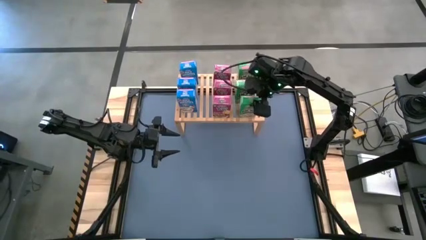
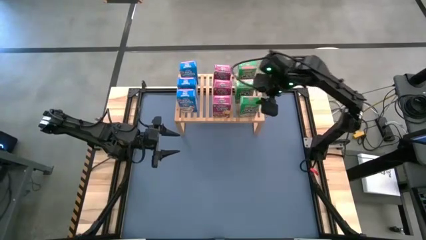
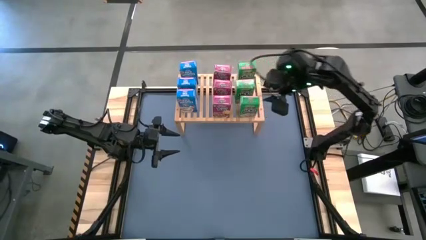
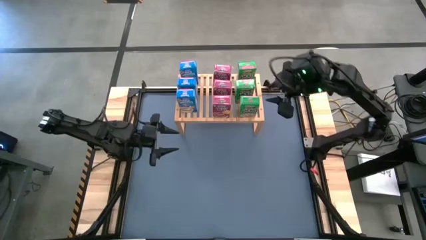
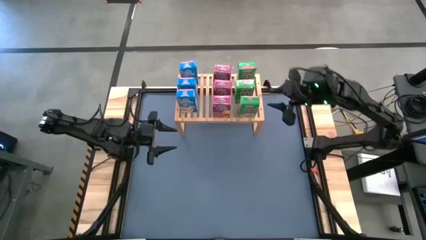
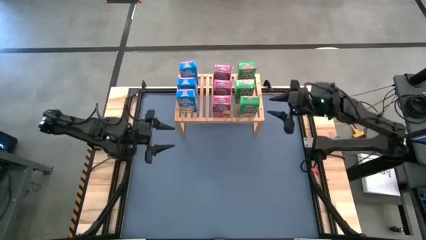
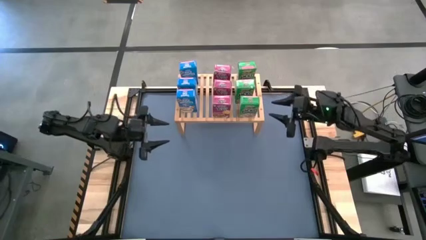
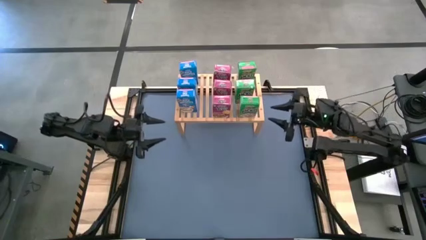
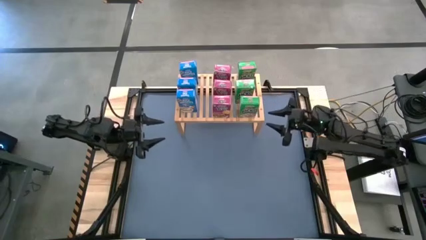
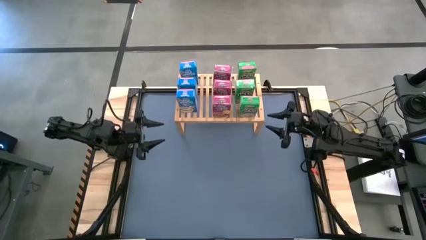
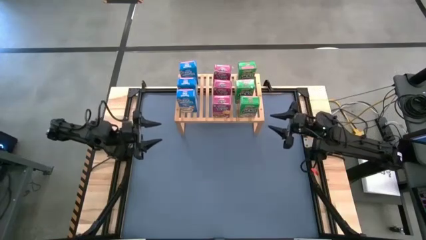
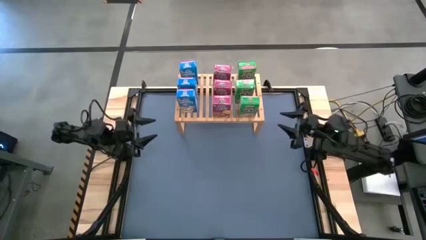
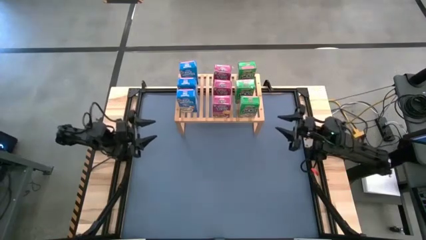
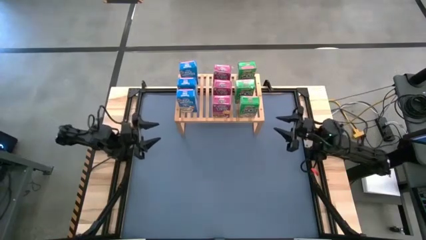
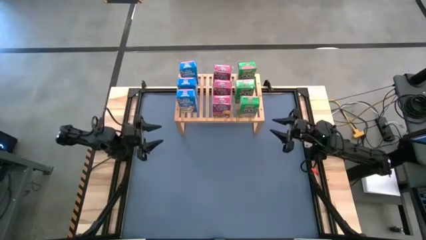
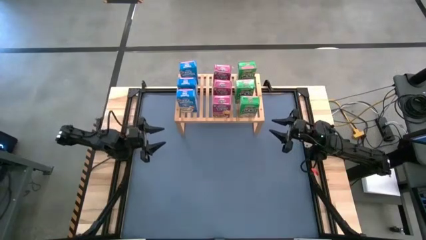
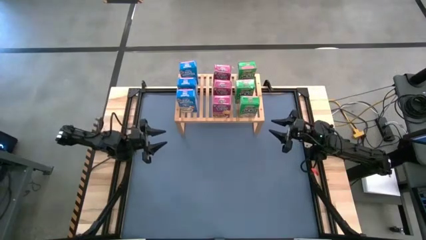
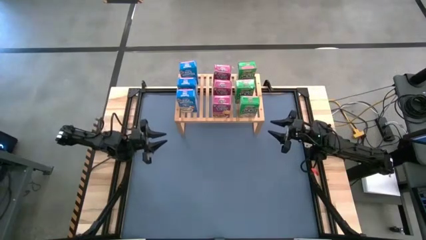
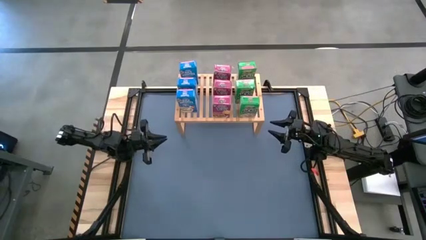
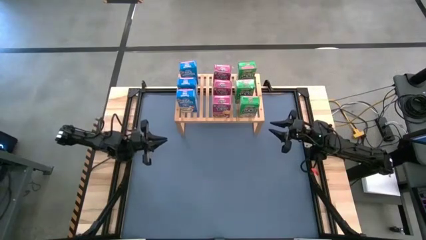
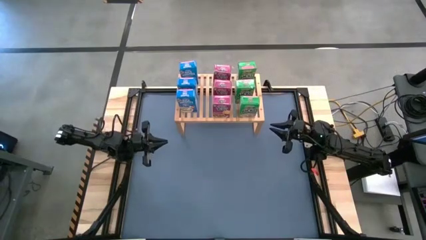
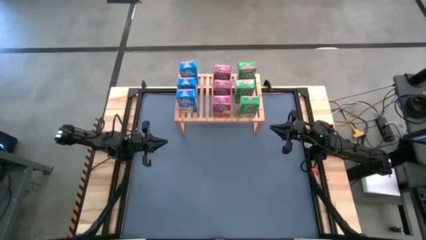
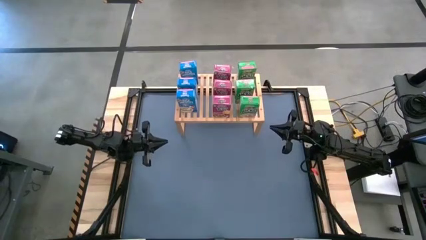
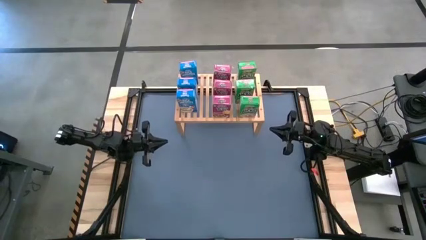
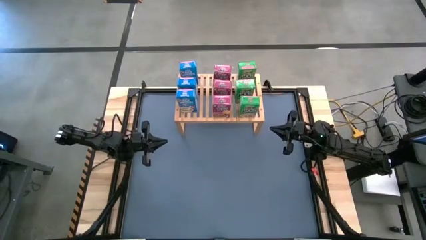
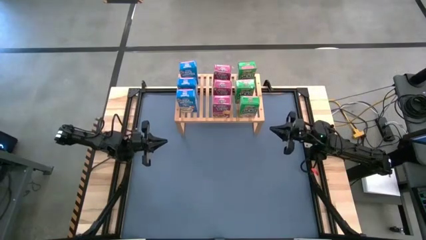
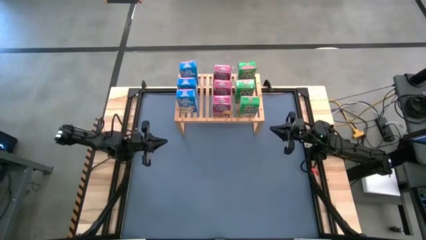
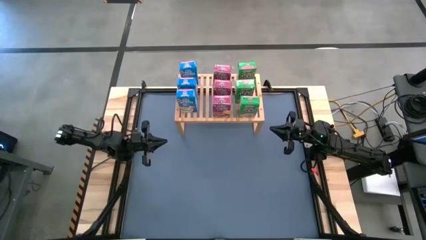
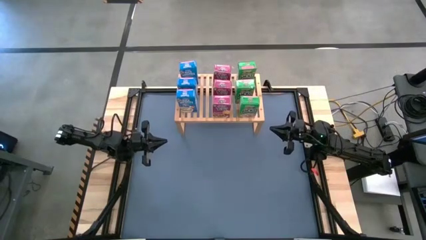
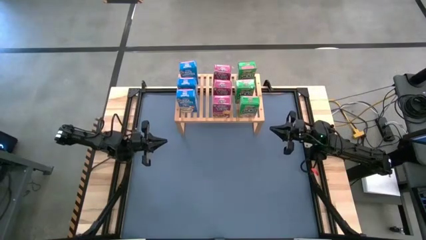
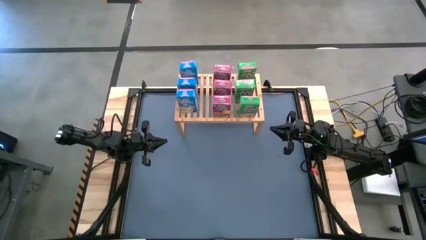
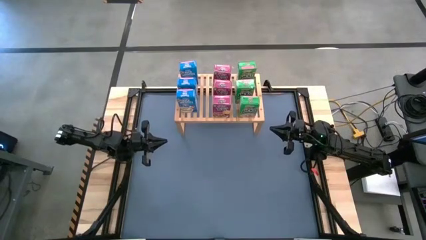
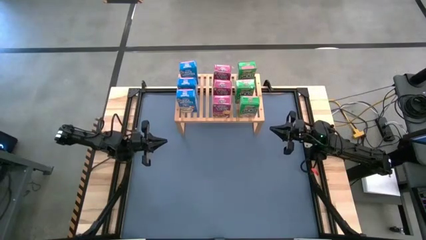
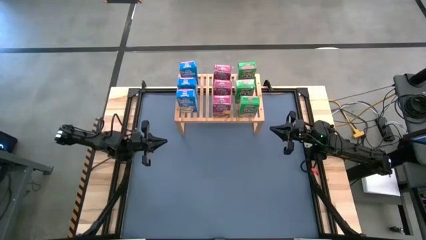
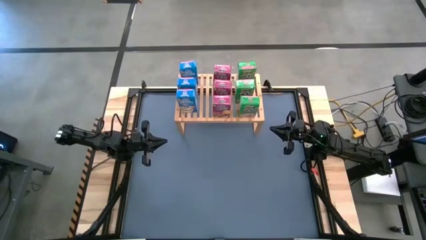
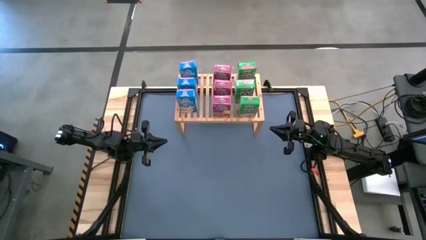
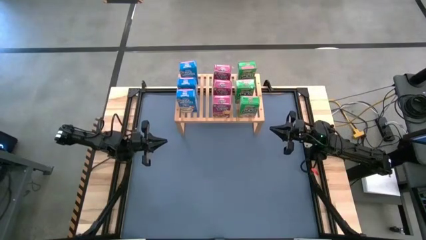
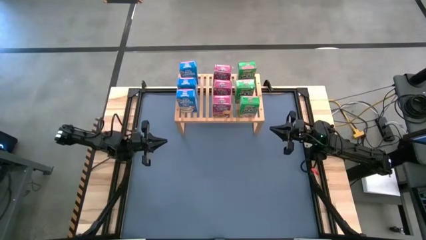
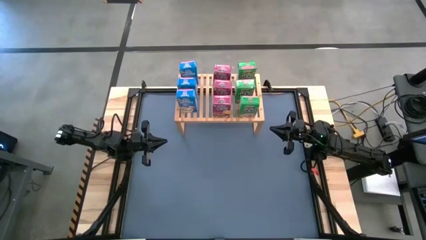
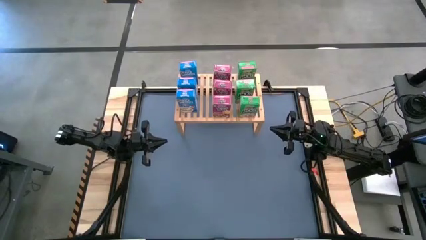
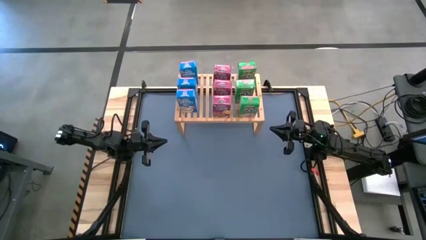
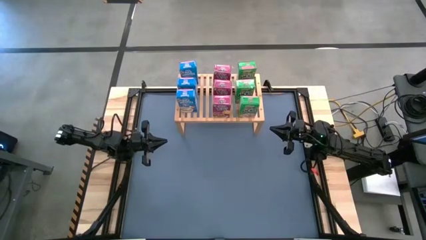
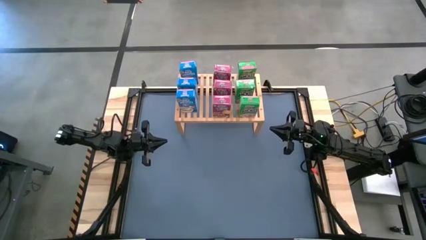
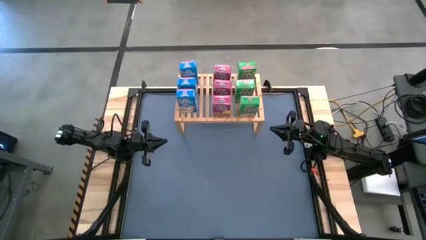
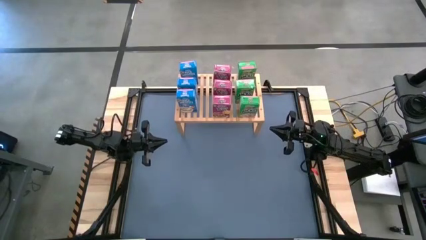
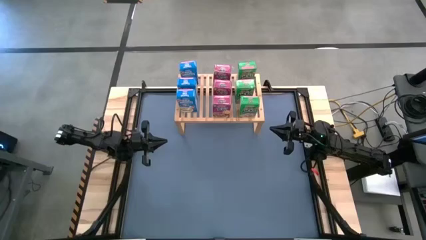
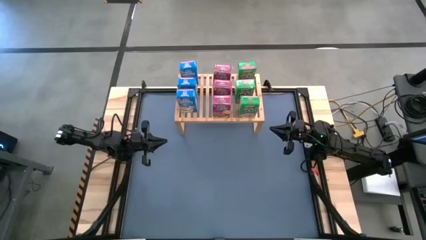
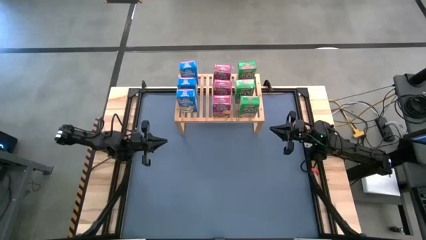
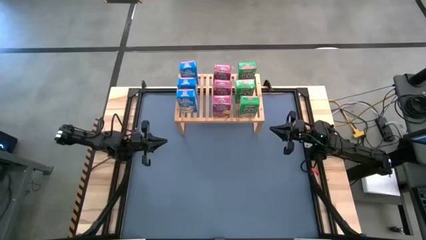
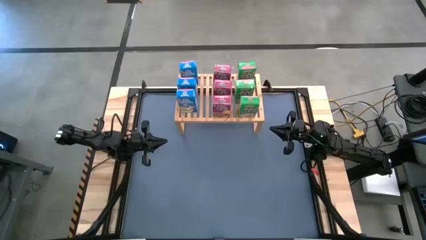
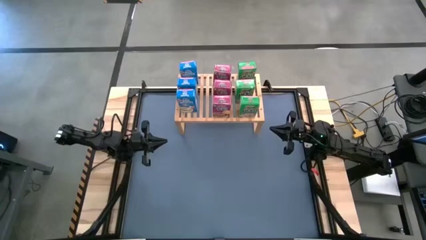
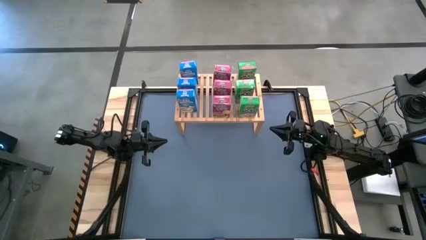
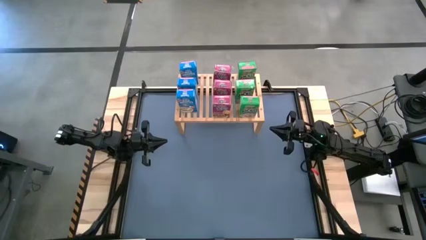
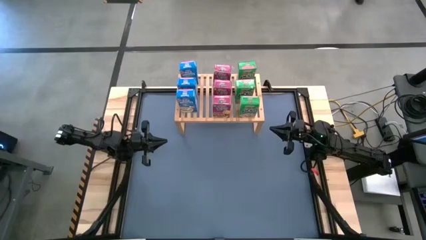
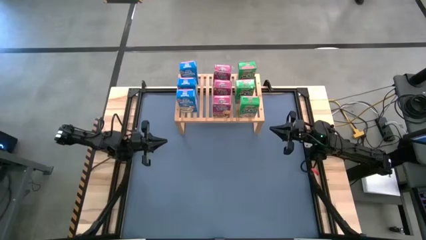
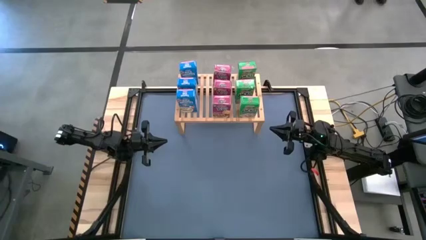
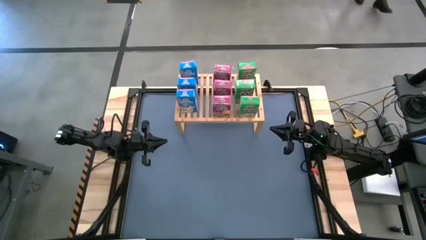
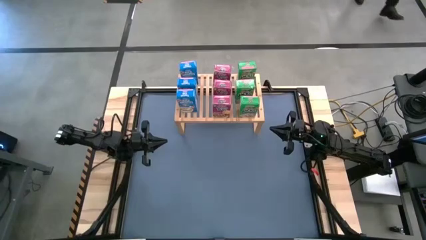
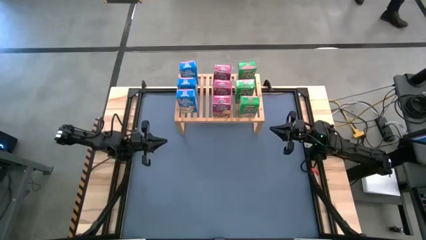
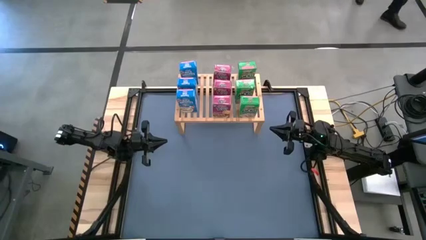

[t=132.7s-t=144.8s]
Task: Stack cereal on shelf
Return to Home Position

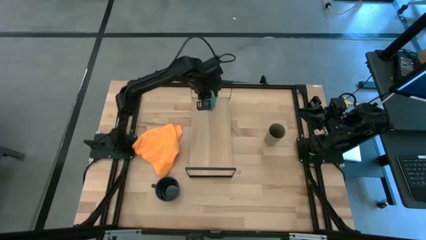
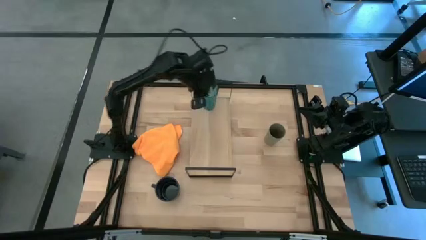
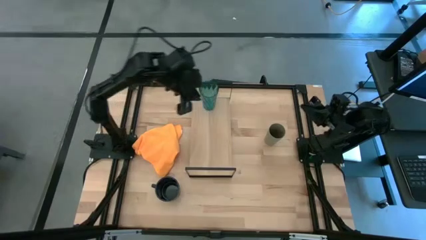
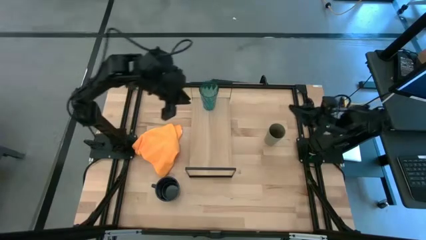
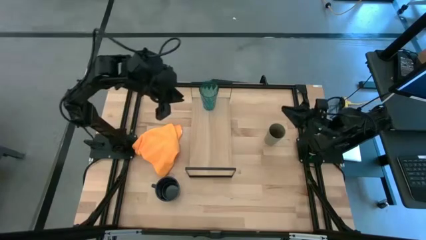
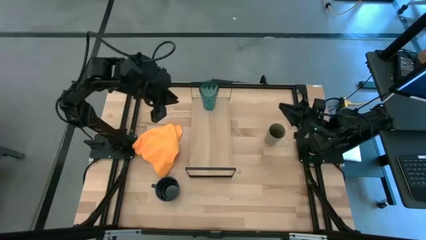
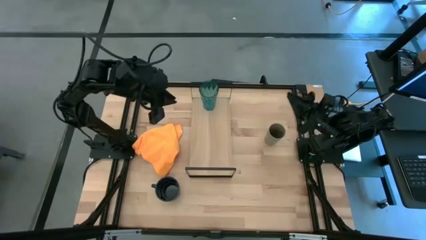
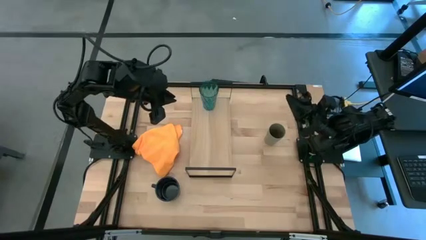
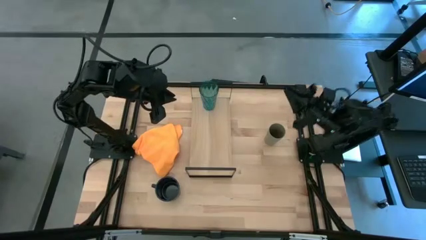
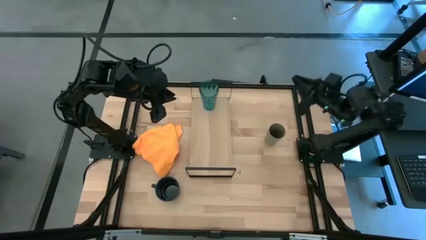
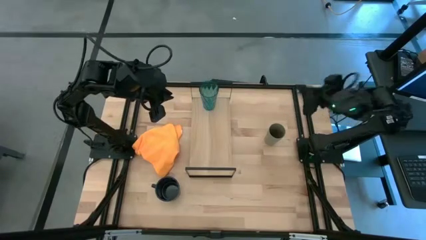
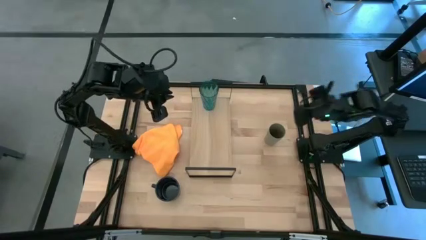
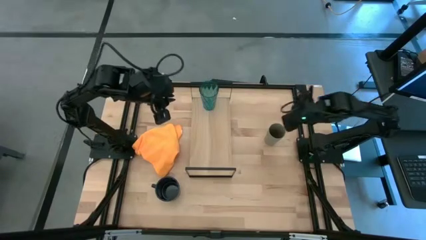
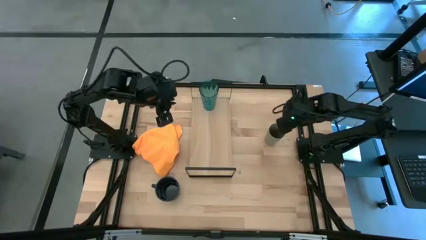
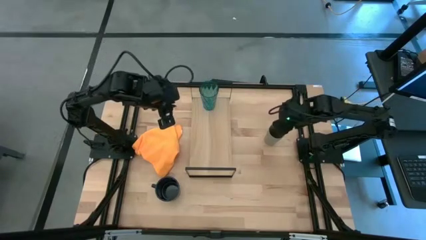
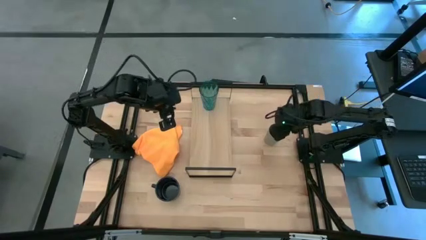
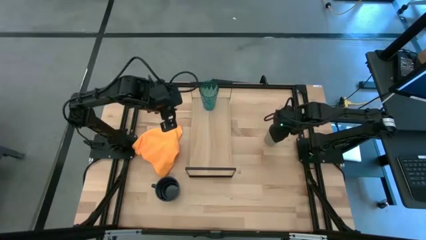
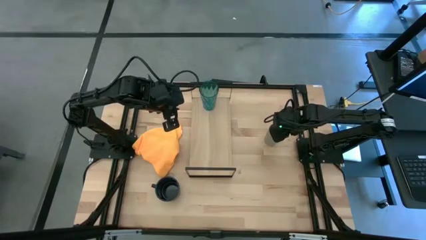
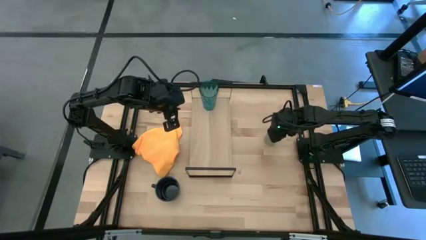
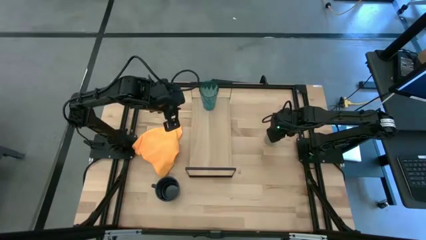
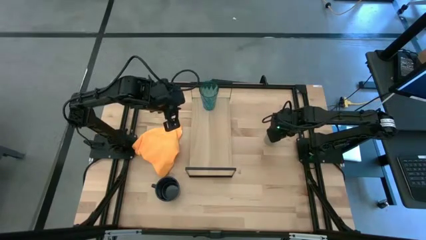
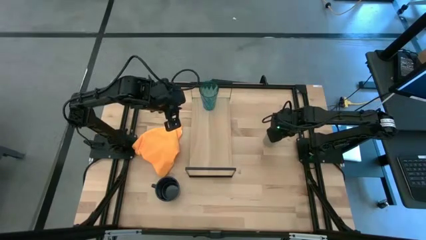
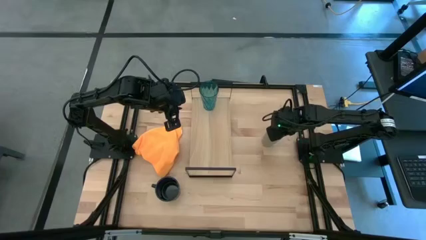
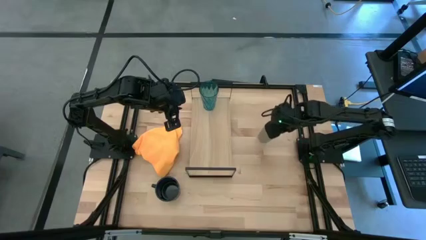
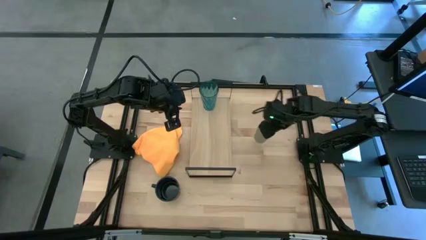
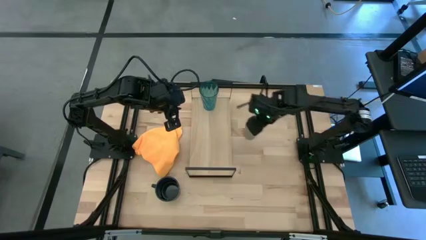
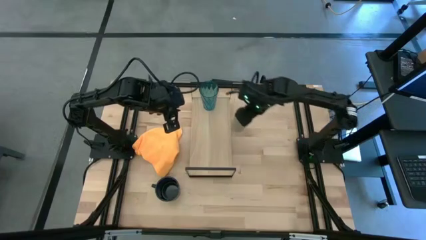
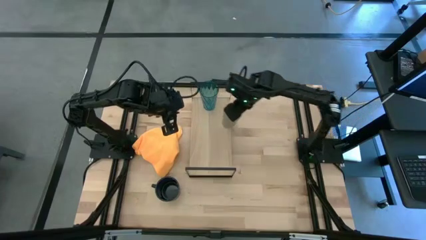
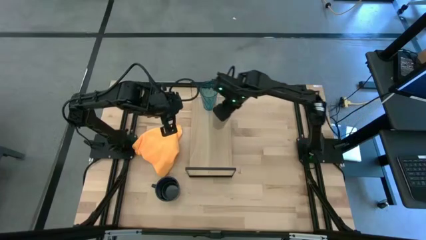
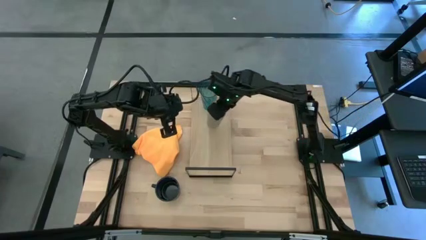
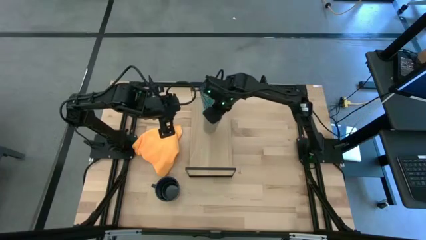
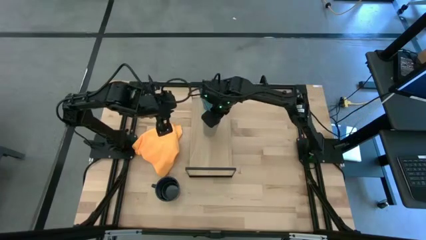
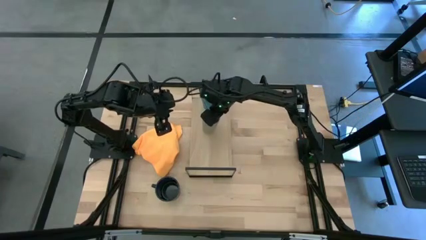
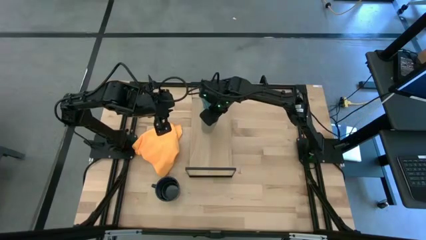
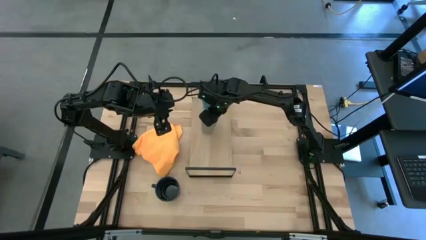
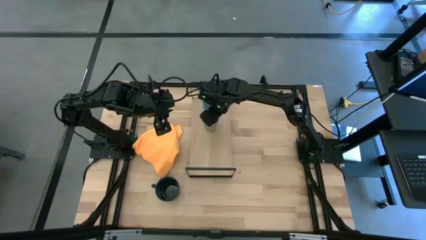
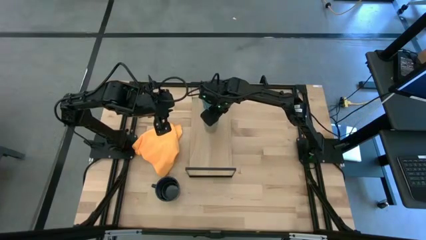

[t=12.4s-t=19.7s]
Task: Stack small to large cups/mugs on shelf
Put the gray cup on the shelf
